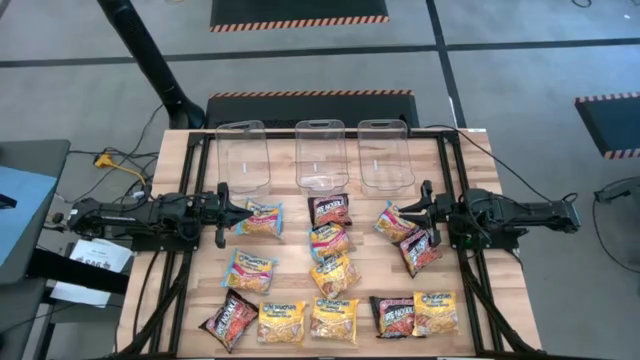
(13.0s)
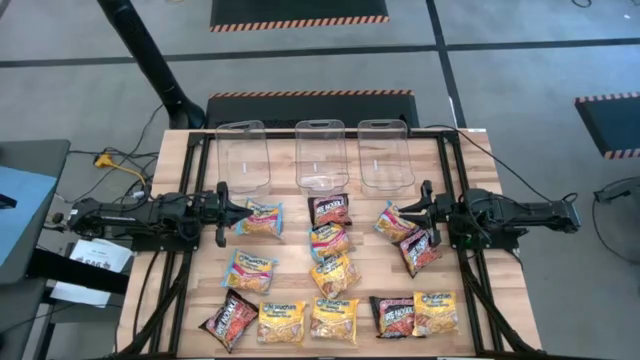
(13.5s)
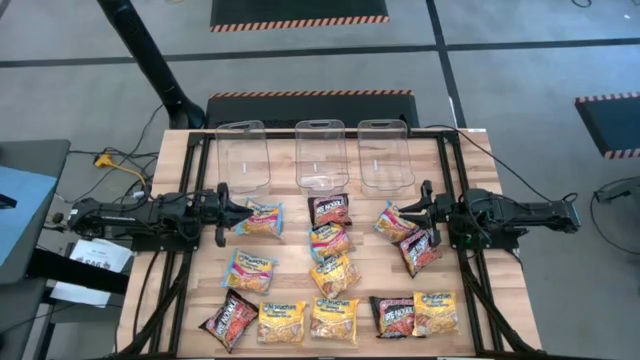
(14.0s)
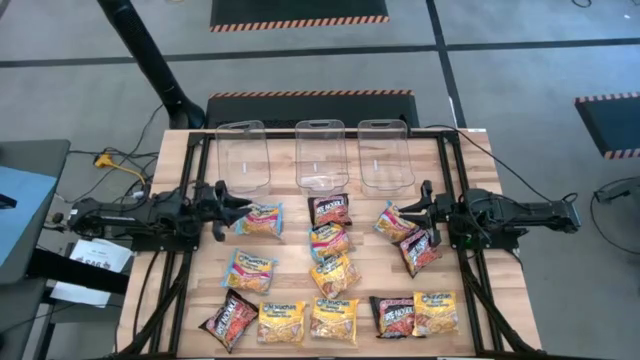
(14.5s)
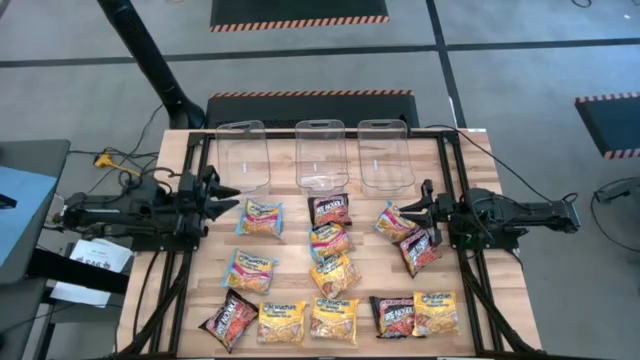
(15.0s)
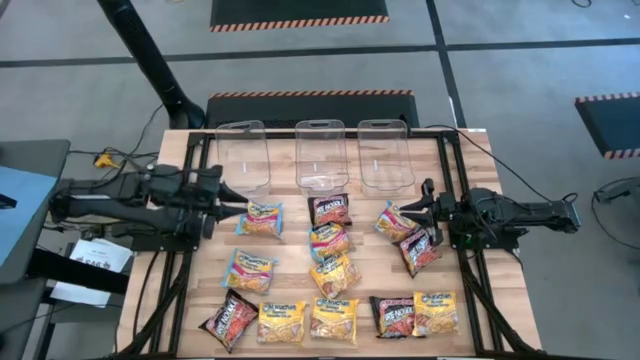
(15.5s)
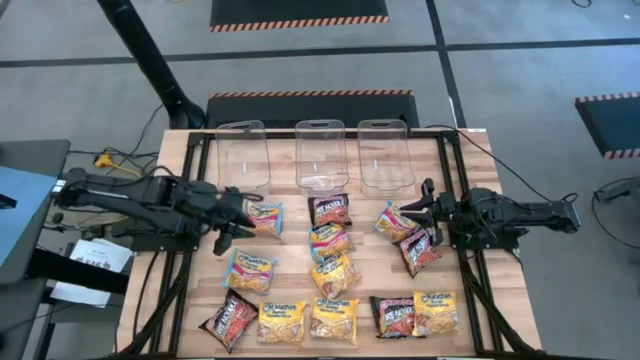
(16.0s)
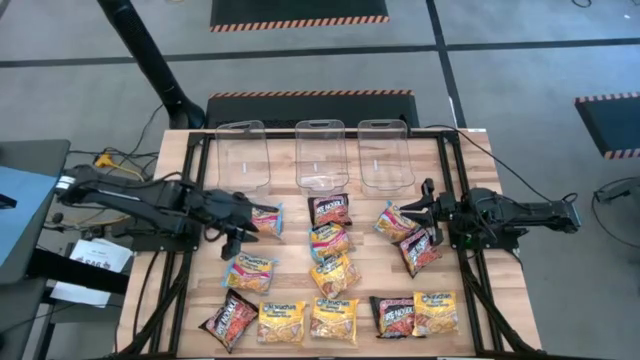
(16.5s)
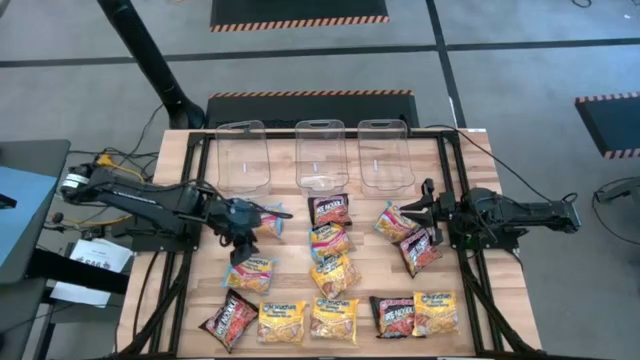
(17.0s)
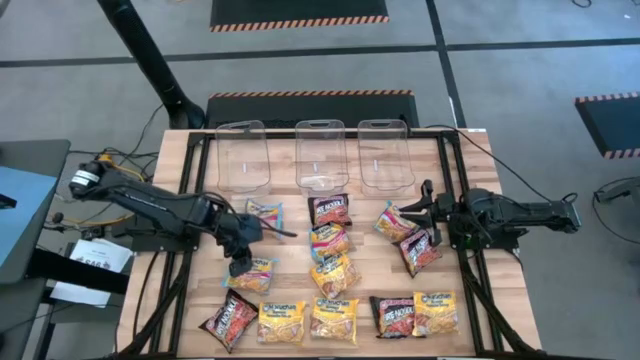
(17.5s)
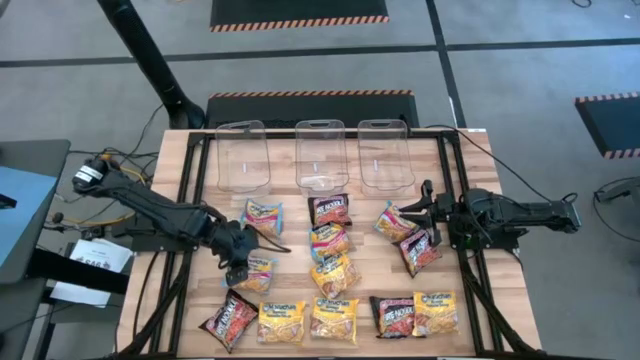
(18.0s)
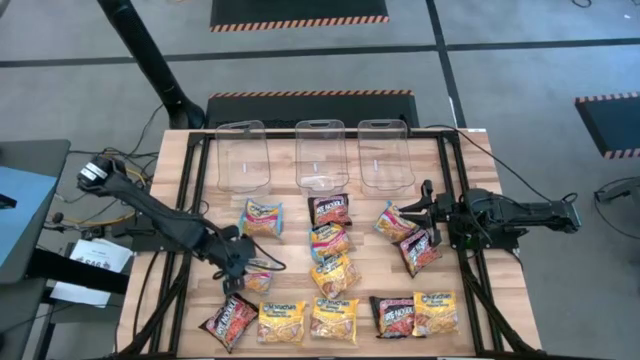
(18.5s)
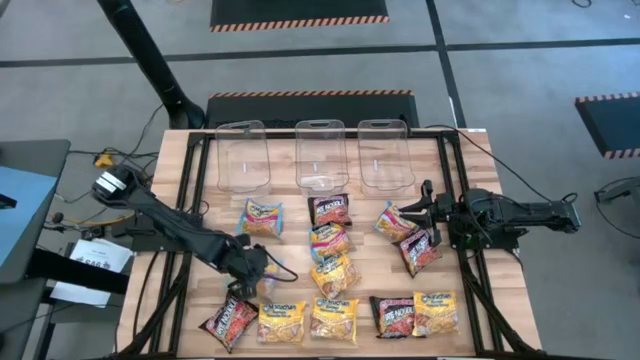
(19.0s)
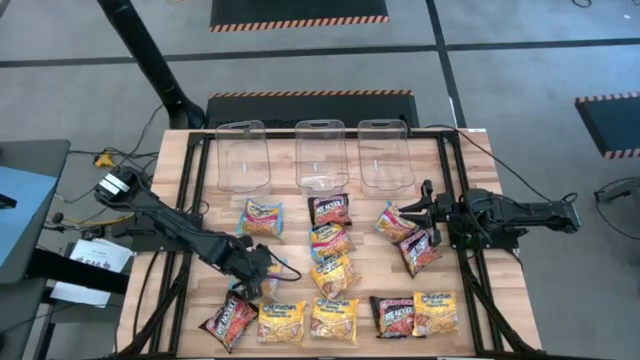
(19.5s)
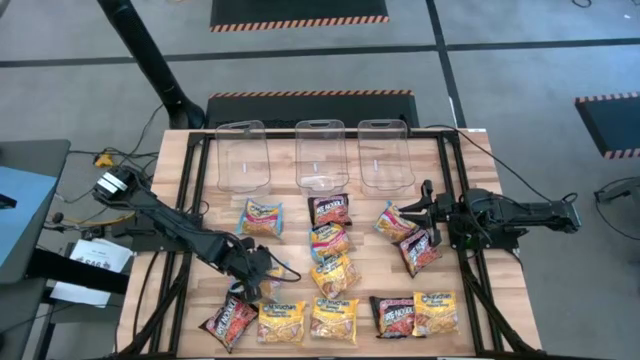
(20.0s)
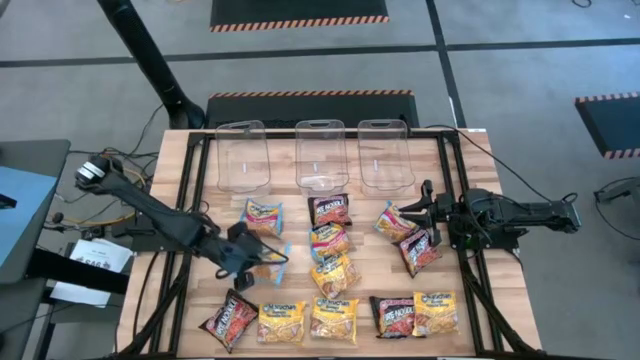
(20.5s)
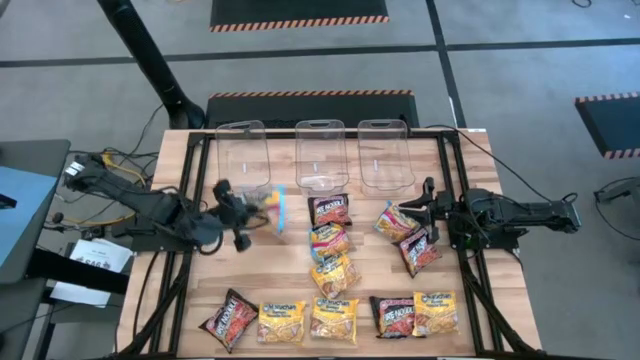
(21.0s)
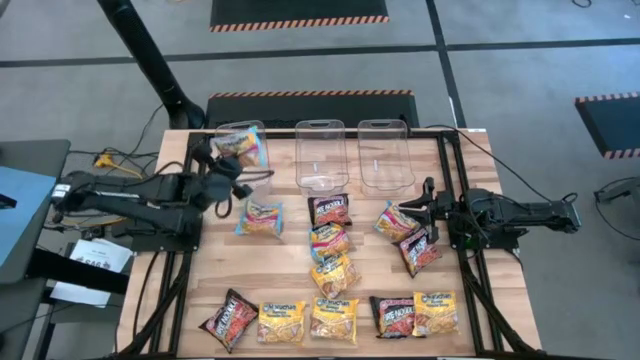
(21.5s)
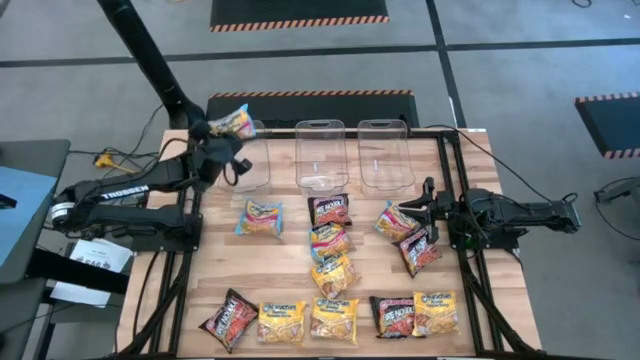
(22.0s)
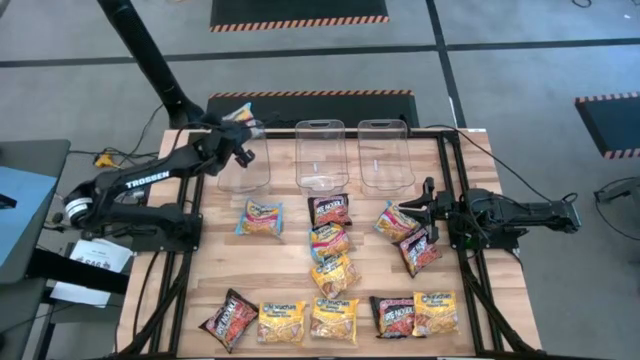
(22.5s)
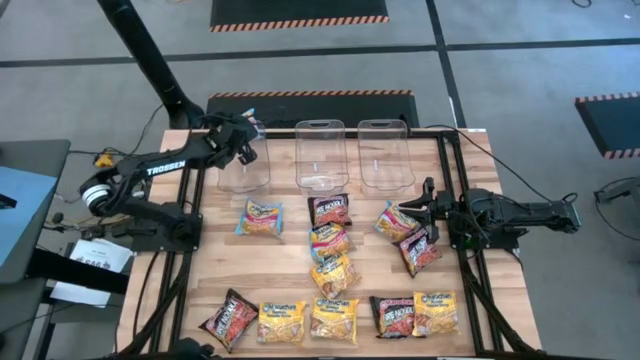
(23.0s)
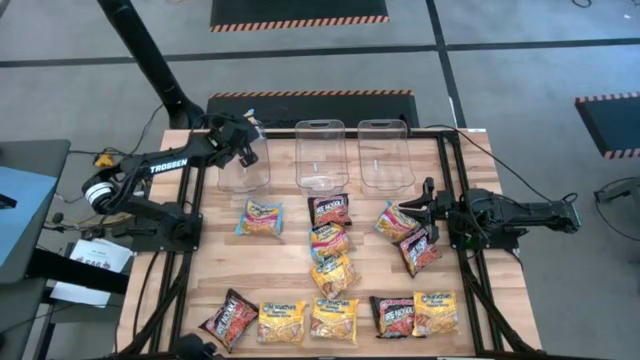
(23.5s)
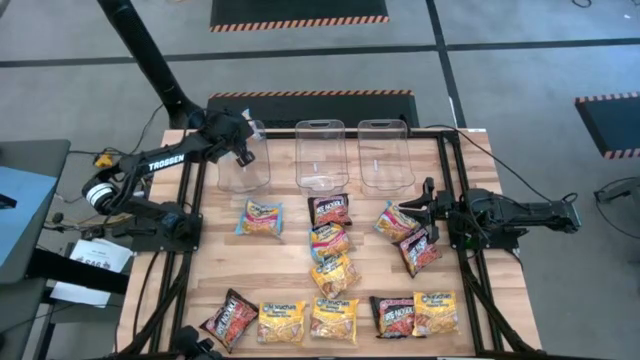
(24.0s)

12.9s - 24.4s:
Task: Sort Maruchan noodles
Put the blue noodle pack into the left transparent bin

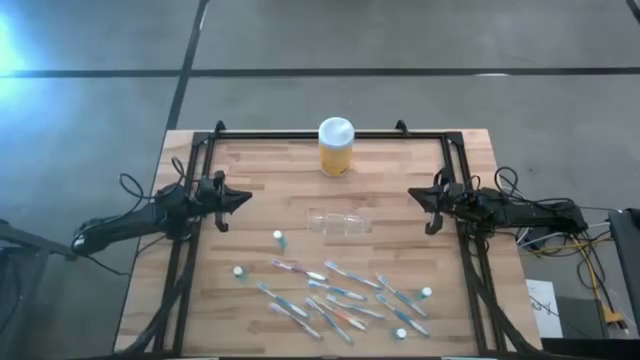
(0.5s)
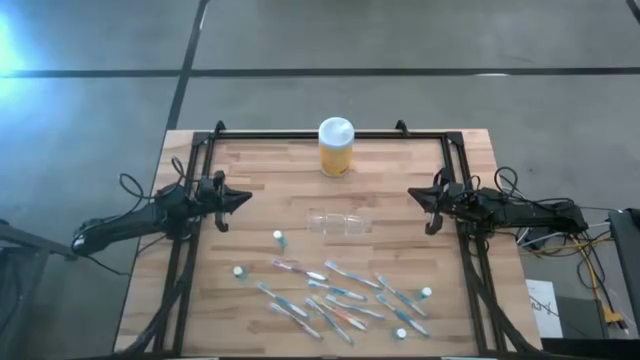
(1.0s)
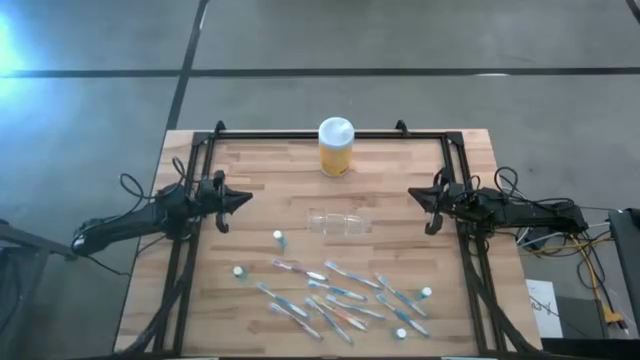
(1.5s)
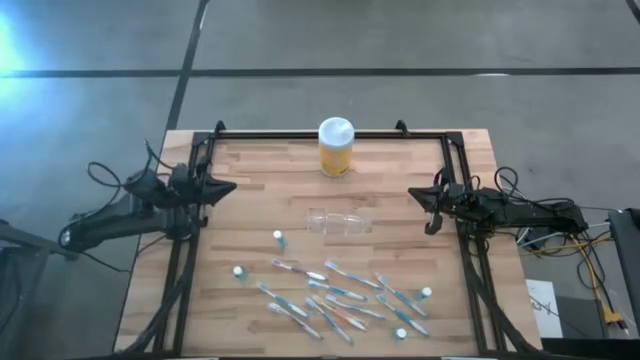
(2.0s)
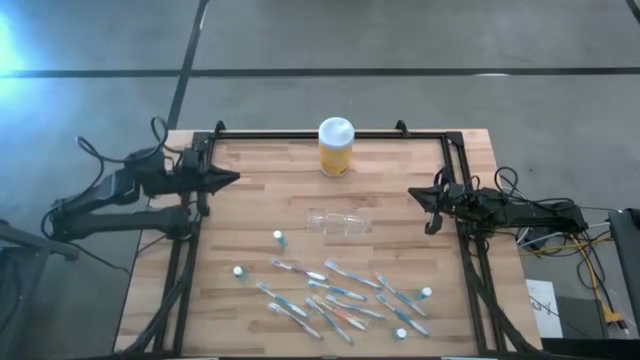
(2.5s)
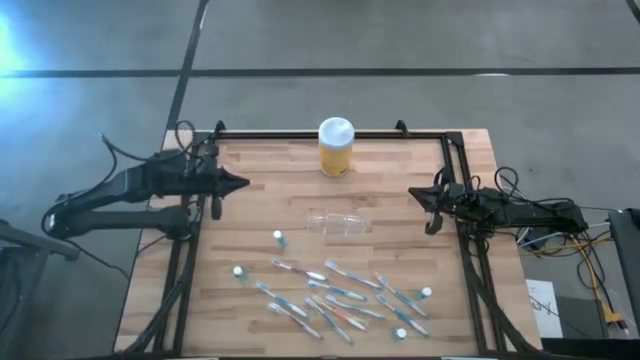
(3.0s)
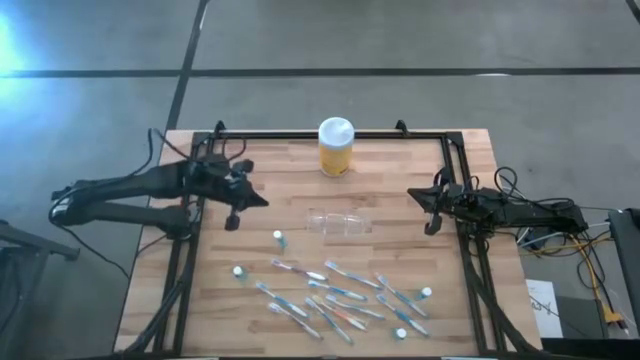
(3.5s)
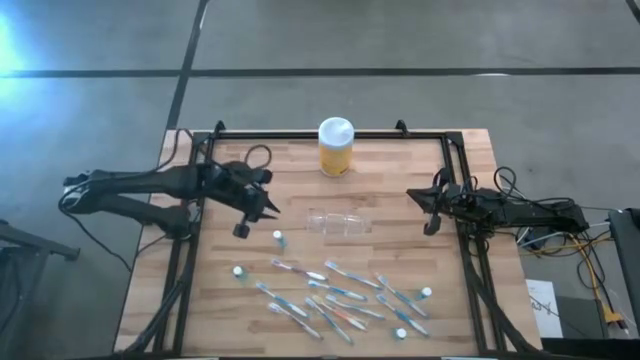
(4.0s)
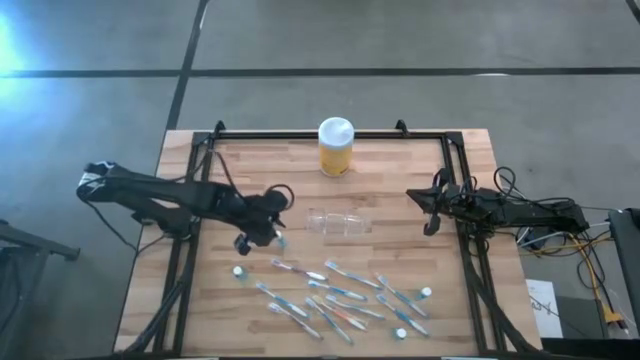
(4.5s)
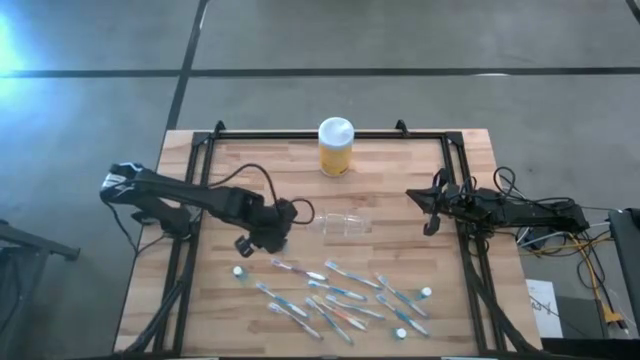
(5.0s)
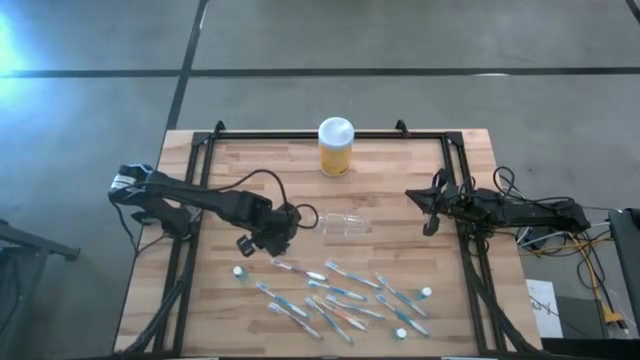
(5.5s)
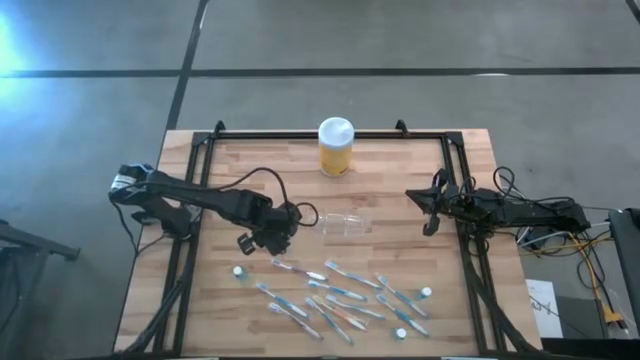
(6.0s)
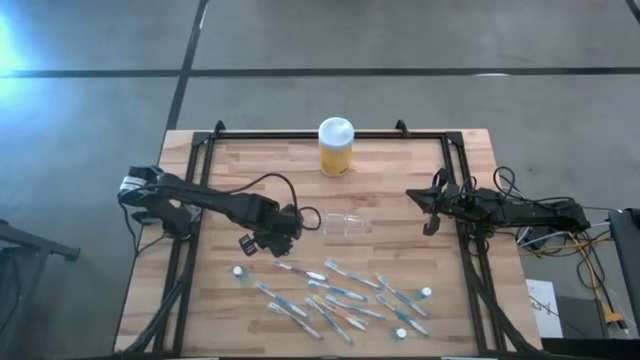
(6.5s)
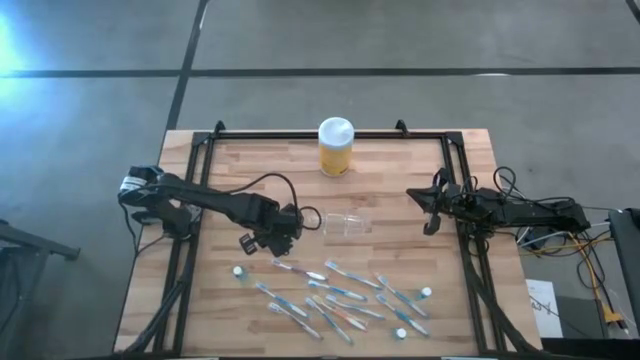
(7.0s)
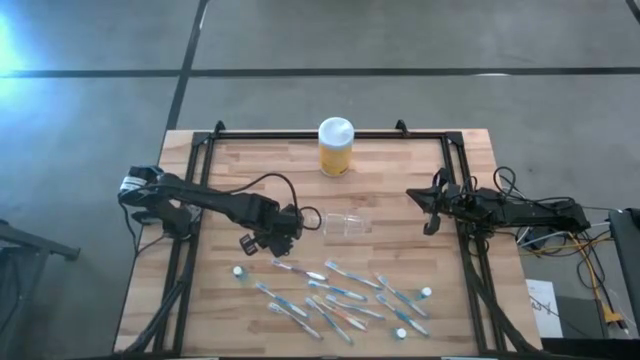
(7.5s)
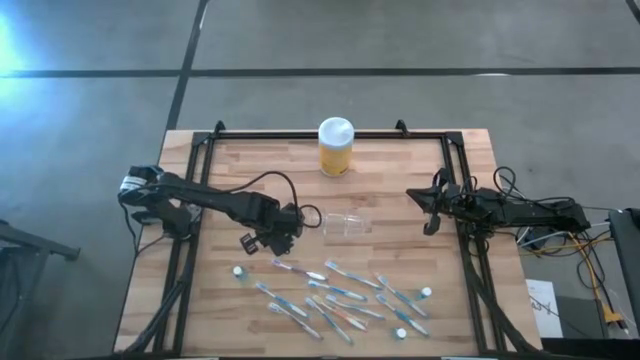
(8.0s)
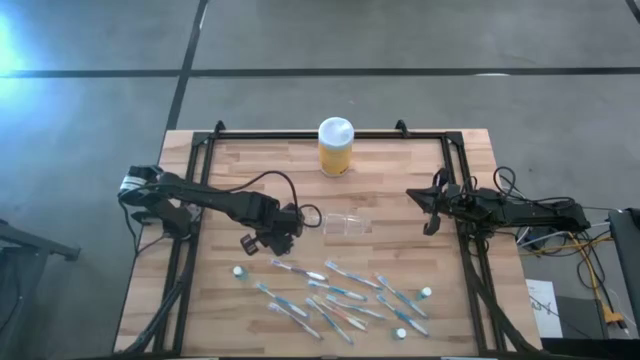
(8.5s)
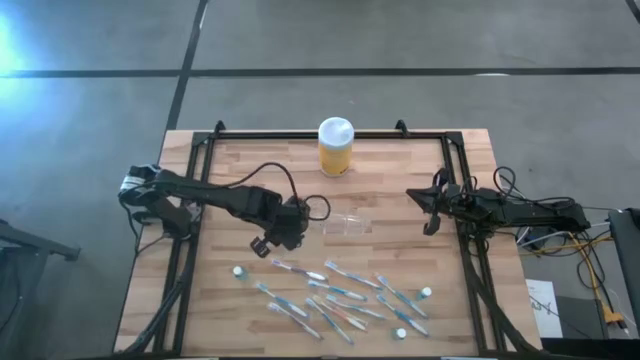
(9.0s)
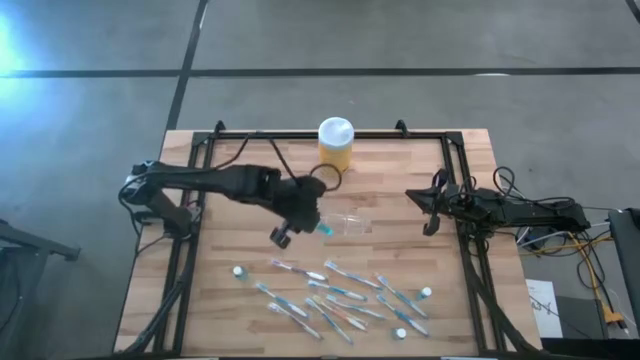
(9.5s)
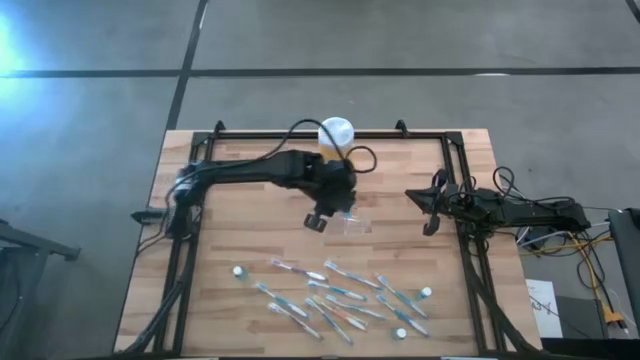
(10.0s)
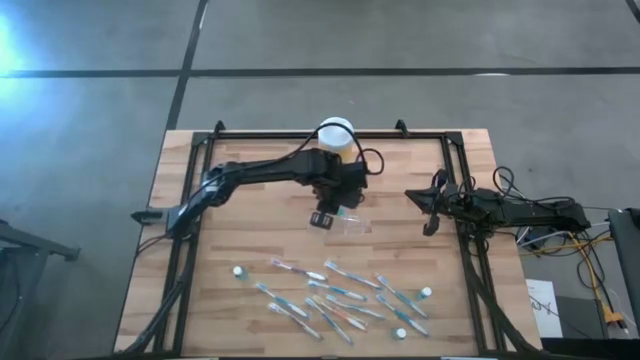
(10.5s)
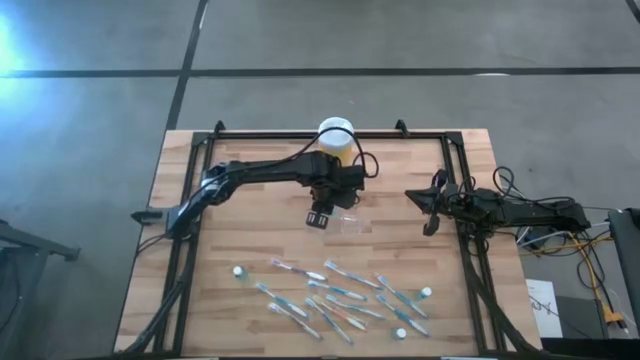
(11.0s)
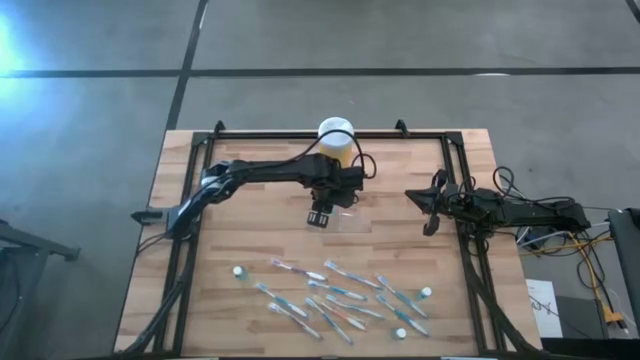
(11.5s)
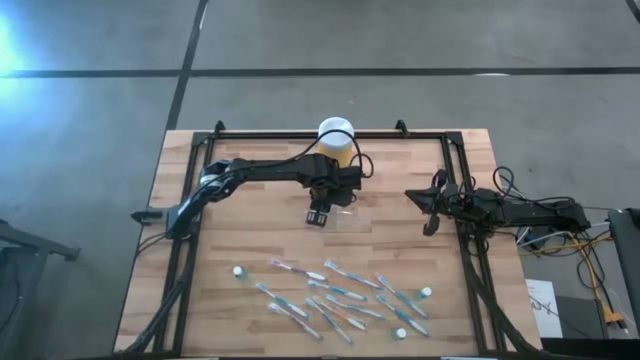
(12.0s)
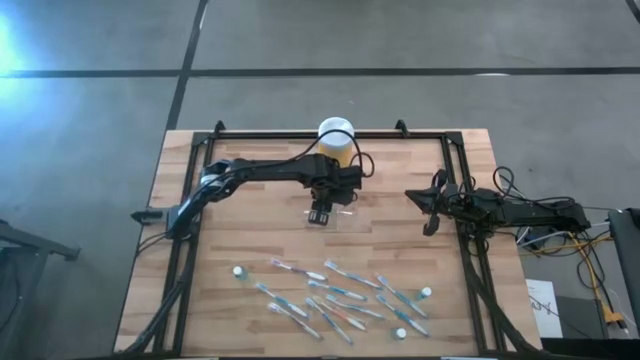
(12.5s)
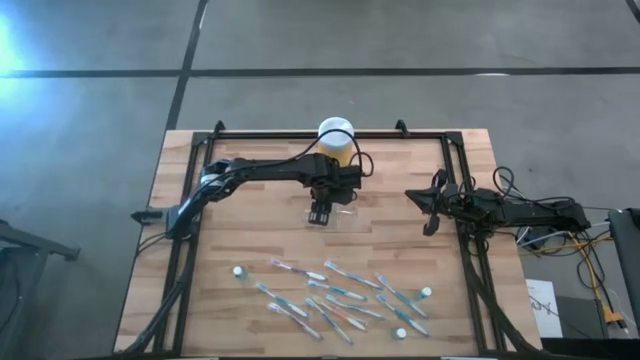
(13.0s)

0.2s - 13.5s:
Task: Pick & Place toothbrushing station
Put the mouthwash bottle into the transparent organizer
